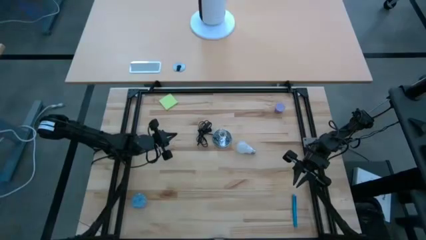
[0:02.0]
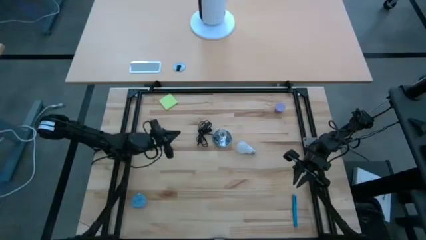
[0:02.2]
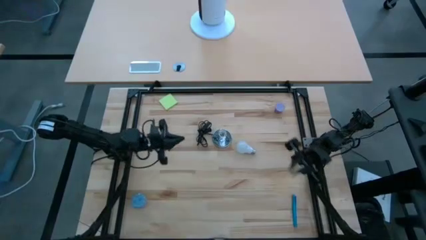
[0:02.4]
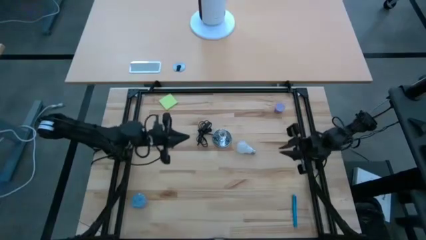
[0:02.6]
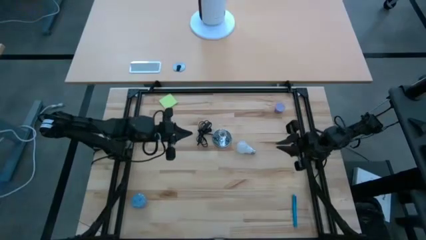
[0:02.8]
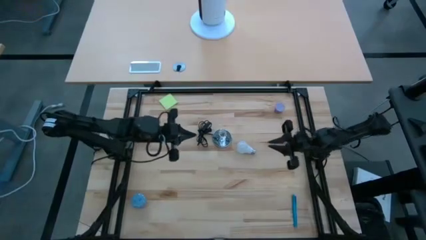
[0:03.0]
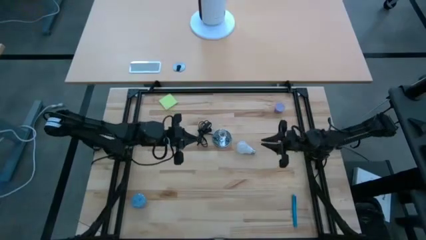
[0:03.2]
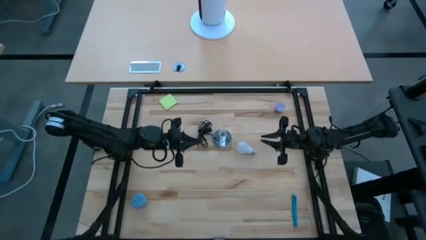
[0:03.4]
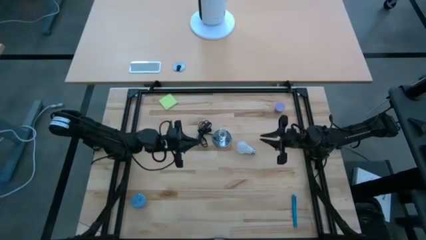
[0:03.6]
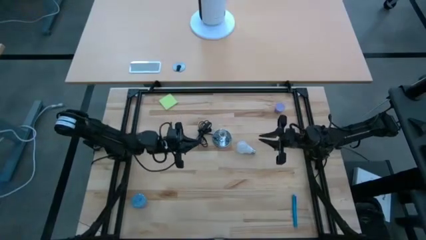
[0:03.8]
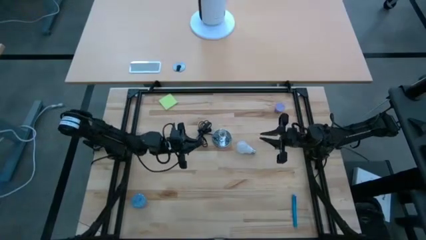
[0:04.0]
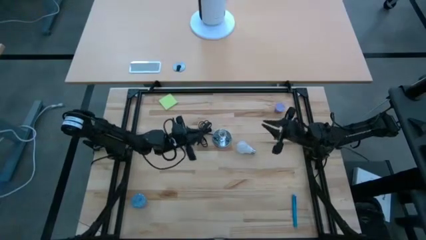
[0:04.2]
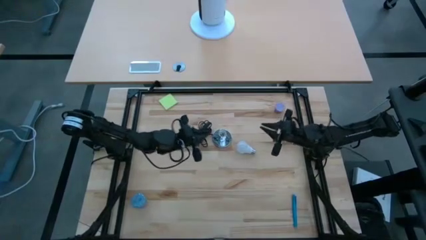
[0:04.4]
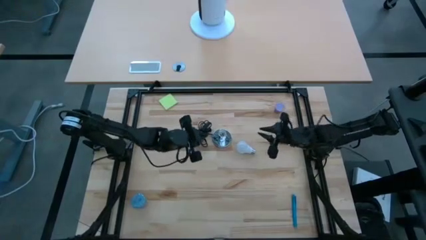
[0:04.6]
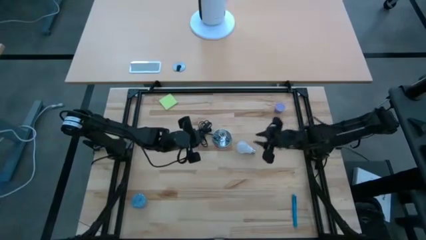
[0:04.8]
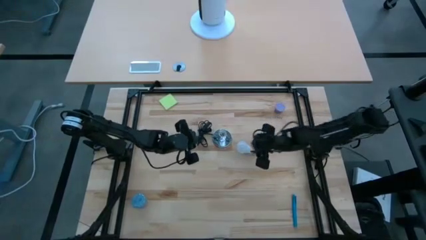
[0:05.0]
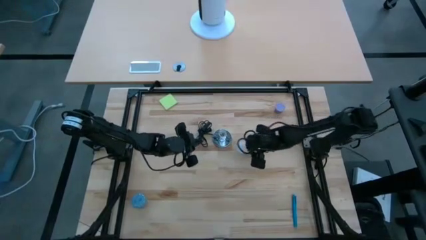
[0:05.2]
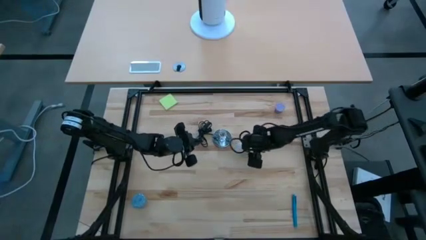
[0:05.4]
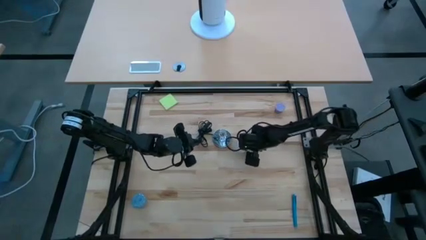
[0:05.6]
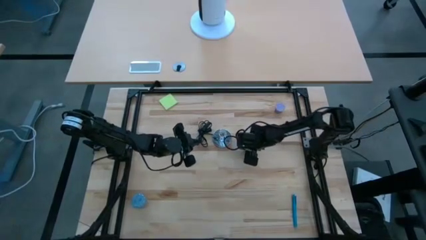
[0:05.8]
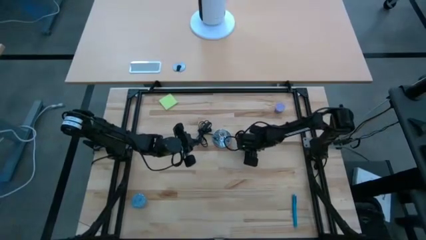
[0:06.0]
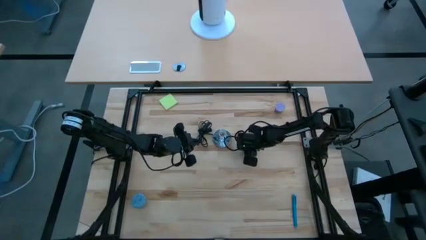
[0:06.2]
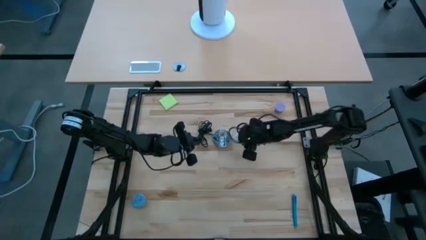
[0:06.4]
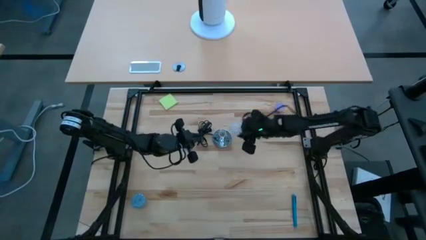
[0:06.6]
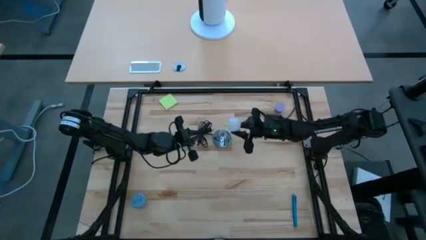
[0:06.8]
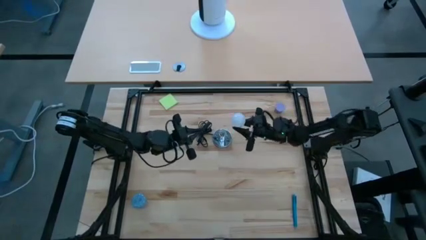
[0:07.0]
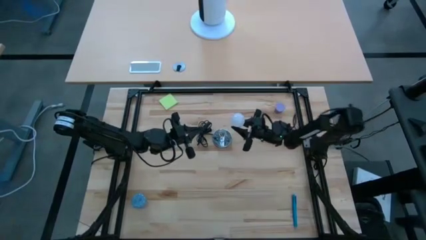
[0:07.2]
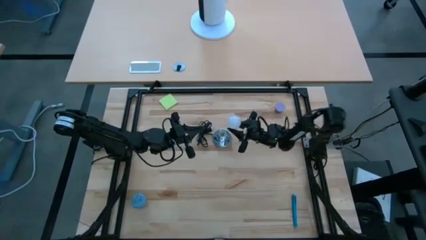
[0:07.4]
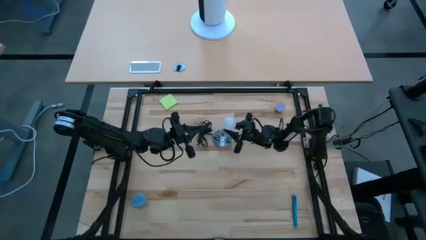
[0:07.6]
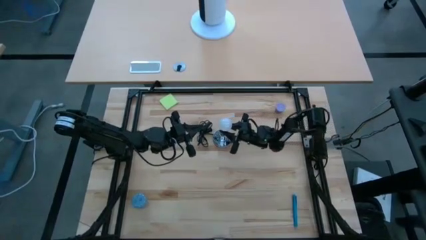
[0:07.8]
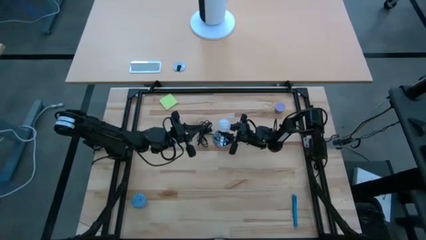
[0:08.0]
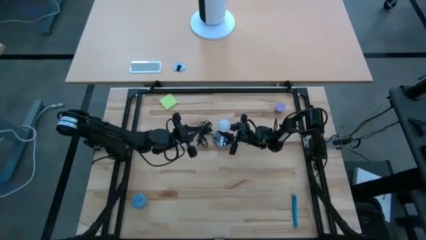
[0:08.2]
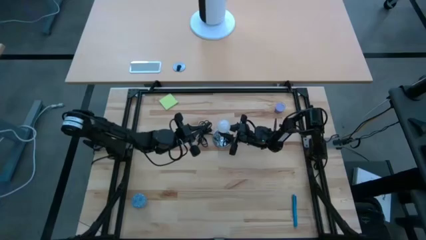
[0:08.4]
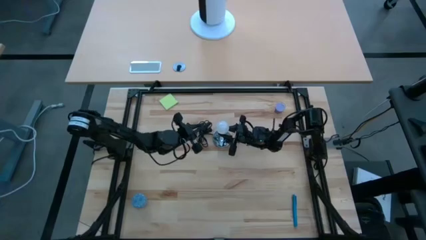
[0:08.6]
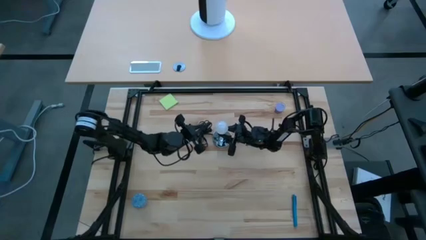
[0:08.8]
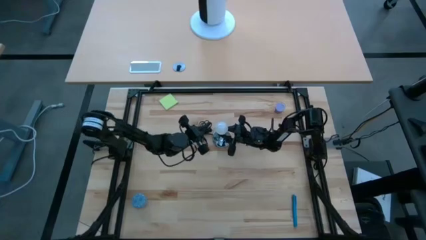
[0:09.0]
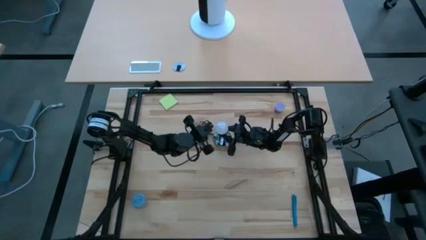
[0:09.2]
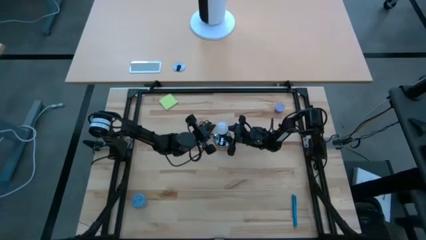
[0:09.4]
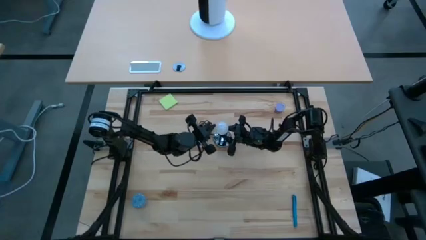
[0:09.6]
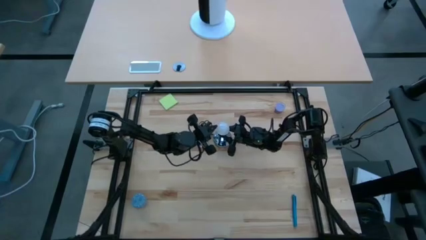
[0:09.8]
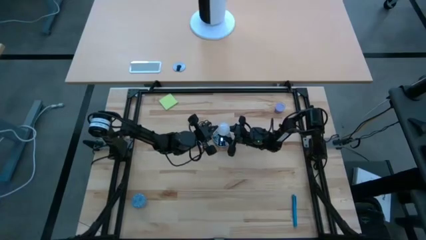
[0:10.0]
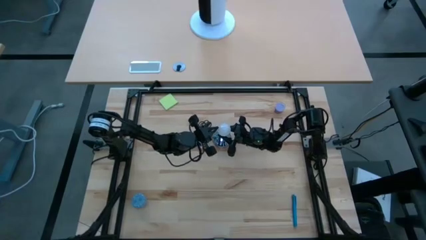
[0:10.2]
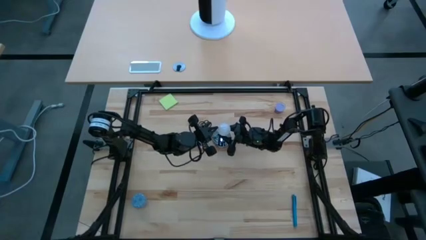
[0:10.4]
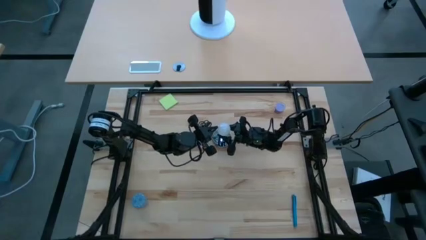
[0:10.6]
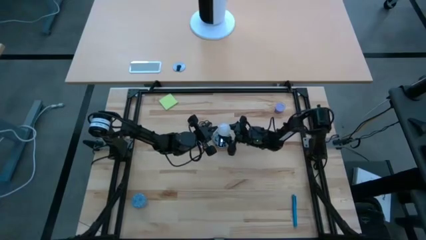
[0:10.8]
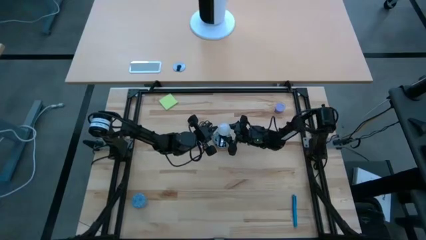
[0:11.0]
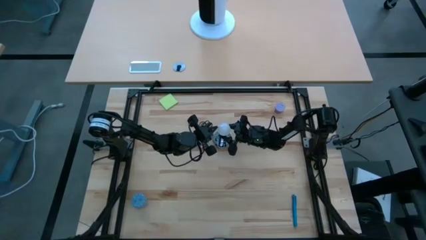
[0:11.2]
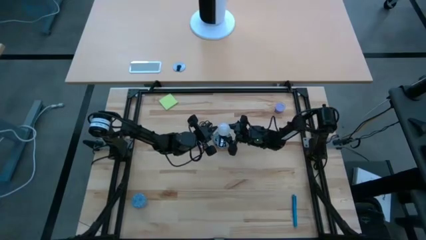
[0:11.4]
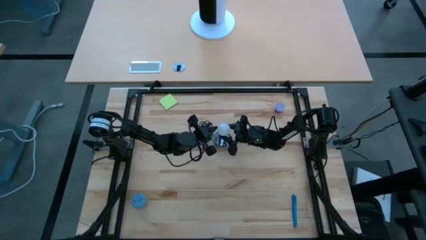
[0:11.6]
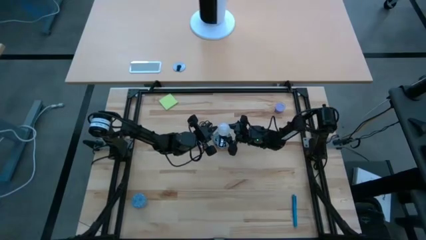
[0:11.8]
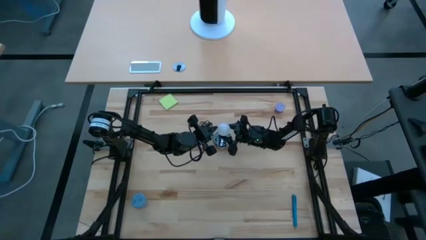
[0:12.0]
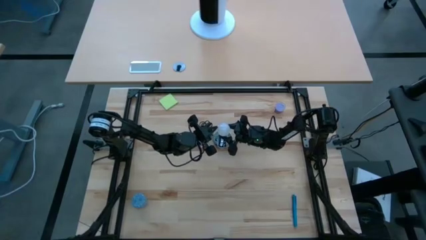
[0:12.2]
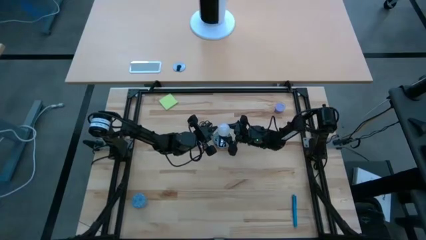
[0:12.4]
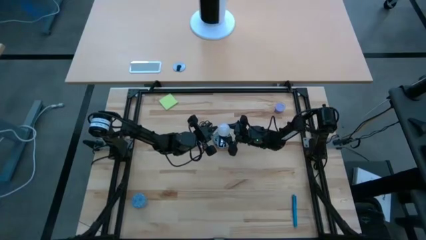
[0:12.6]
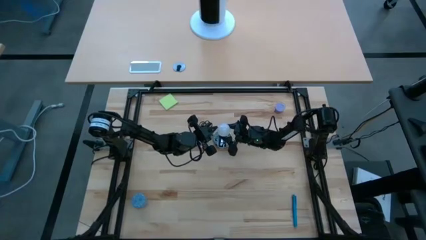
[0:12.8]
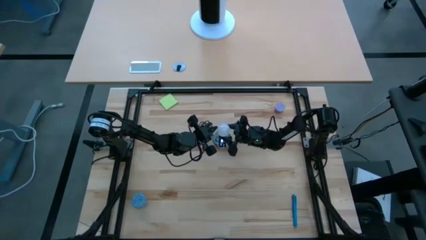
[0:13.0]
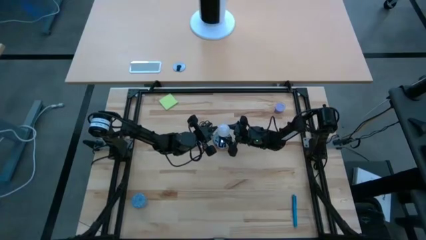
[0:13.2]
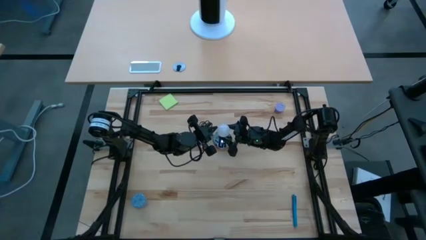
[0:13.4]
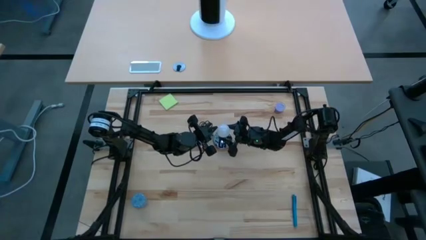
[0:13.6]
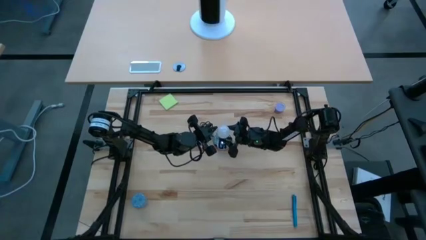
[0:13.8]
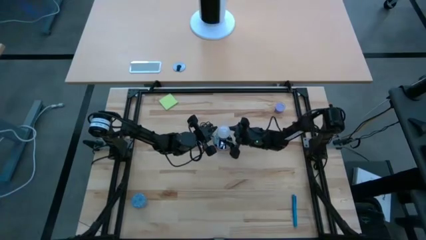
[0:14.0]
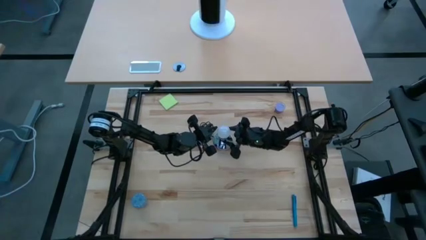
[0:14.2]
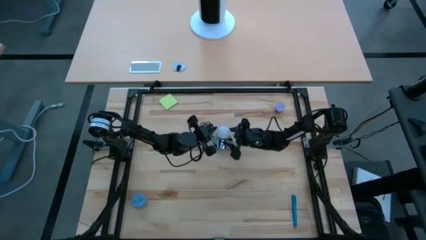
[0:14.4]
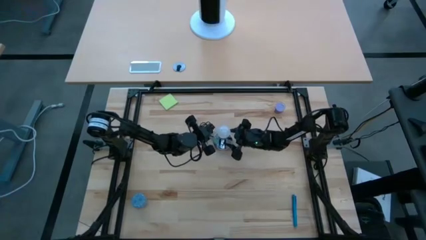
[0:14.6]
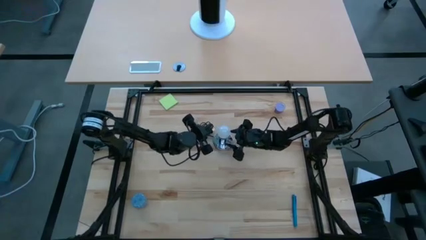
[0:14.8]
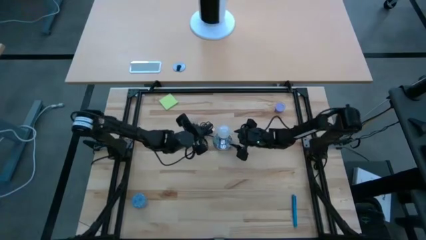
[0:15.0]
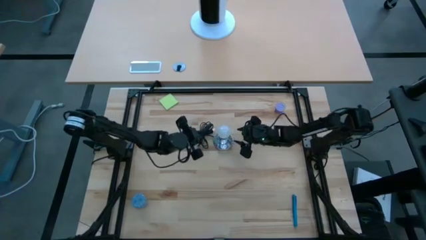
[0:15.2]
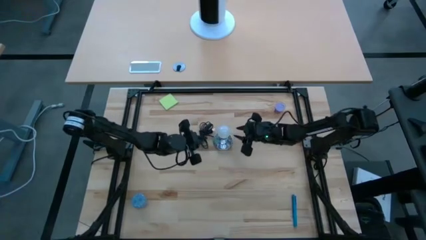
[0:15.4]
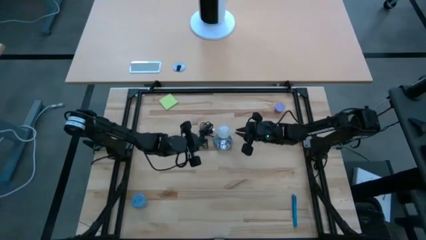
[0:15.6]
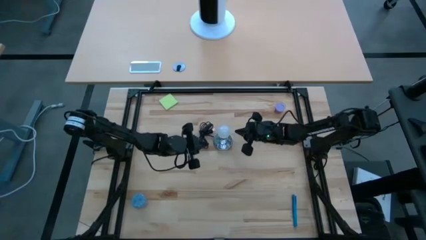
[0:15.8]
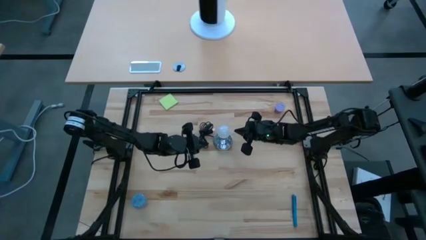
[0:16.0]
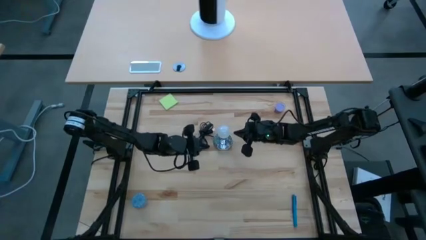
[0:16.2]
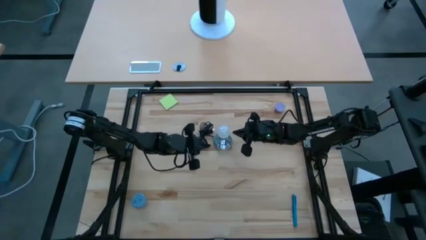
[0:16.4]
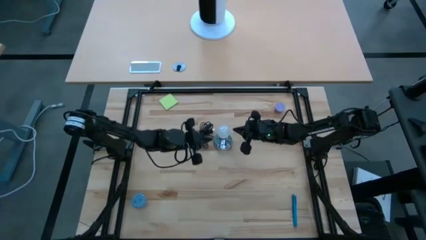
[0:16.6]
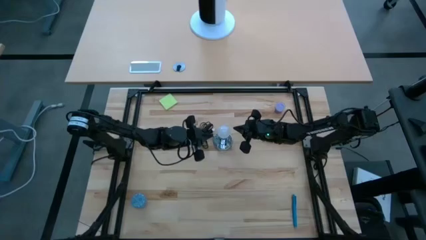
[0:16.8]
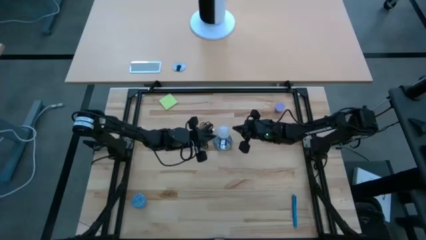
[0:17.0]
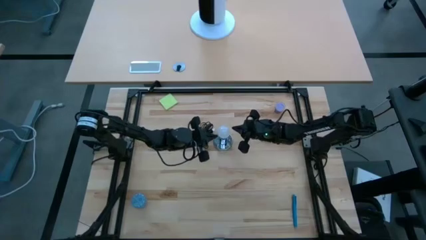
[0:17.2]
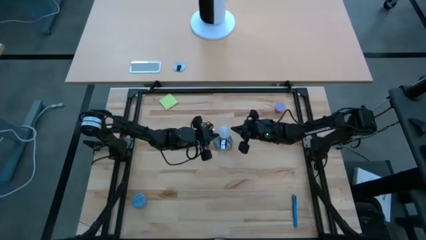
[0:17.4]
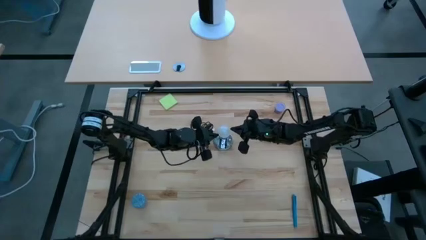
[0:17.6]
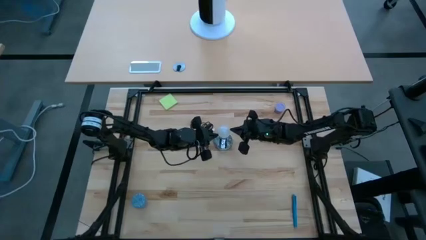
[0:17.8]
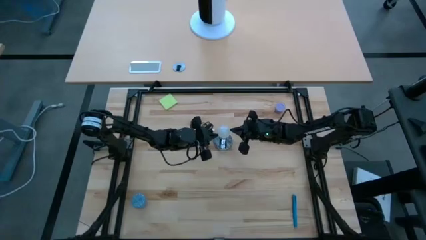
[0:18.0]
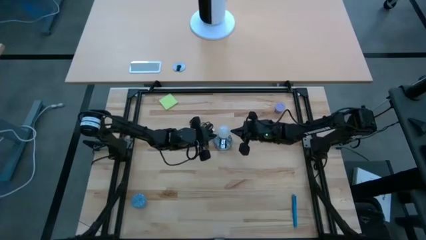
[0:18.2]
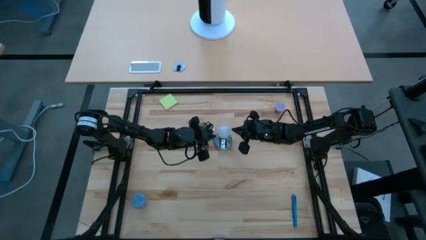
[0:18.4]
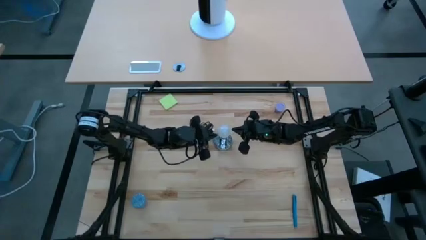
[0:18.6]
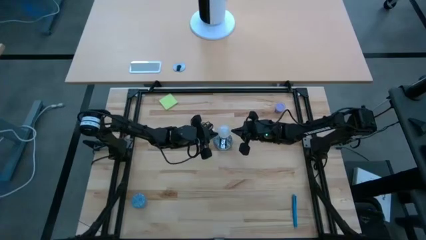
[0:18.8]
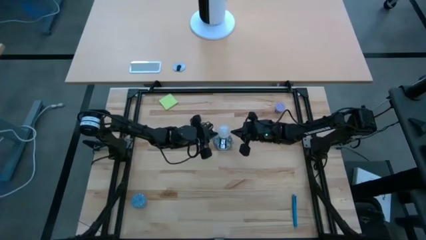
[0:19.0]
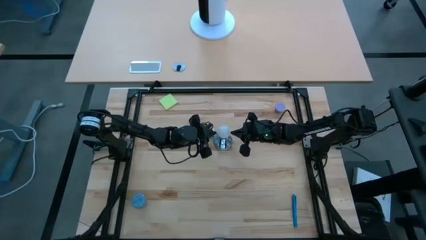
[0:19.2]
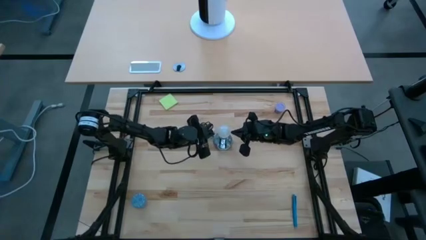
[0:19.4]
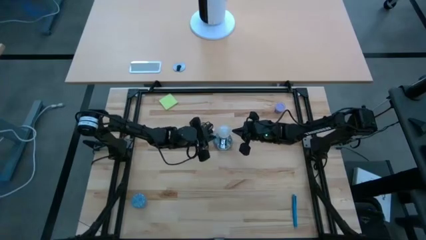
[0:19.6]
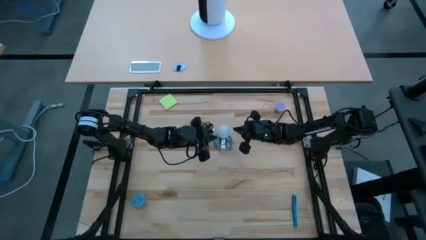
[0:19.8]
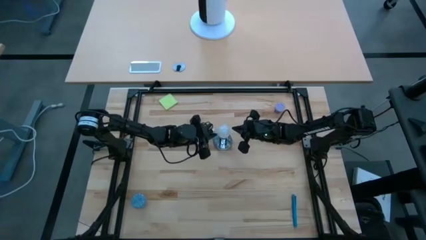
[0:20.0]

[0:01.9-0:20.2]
Task: Screw lightbulb
Insert the white lightbulb into the silver lamp
